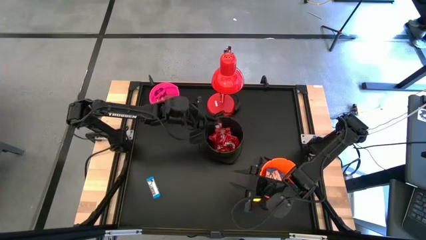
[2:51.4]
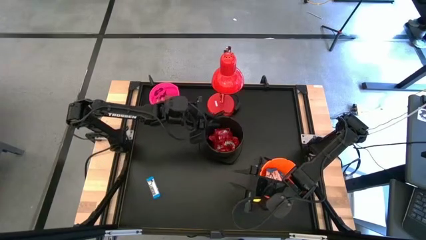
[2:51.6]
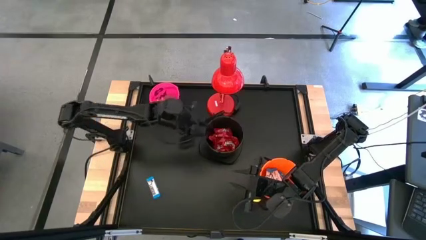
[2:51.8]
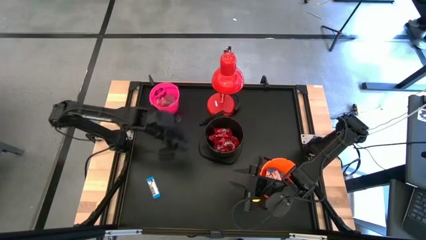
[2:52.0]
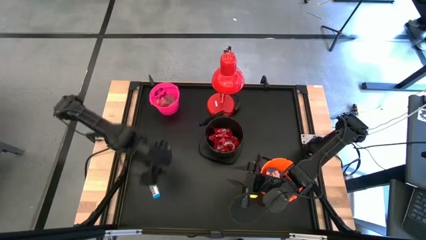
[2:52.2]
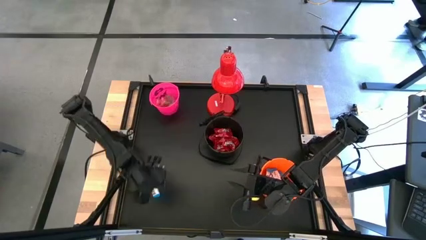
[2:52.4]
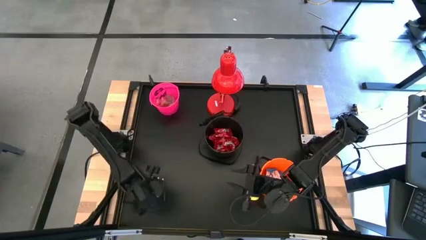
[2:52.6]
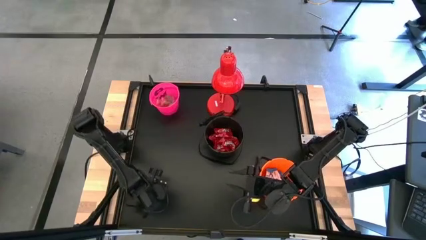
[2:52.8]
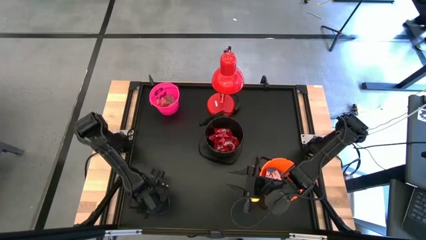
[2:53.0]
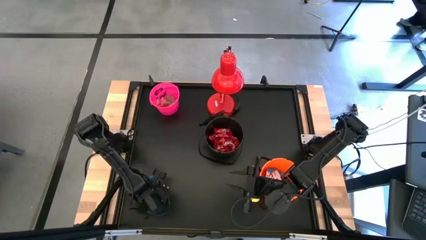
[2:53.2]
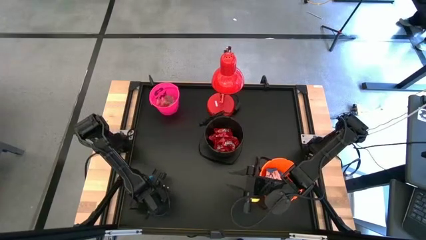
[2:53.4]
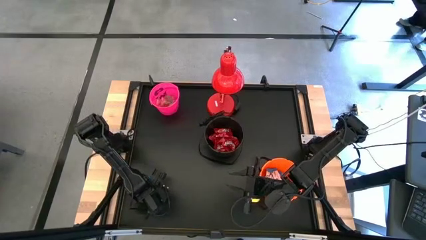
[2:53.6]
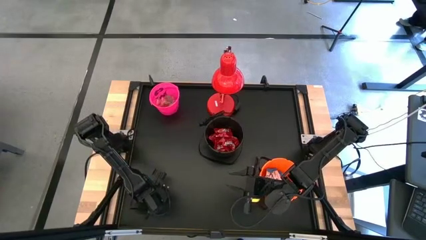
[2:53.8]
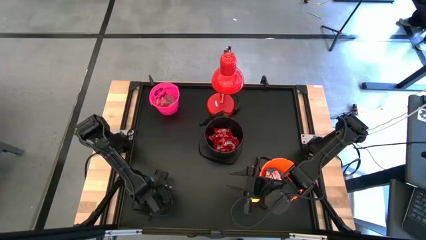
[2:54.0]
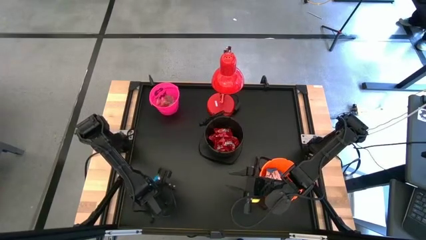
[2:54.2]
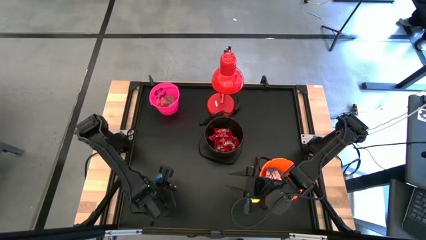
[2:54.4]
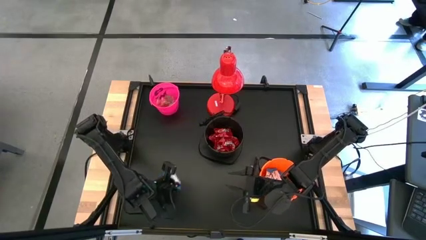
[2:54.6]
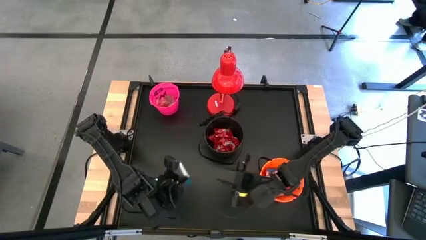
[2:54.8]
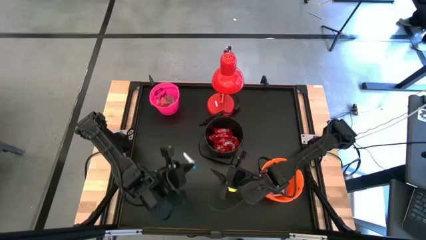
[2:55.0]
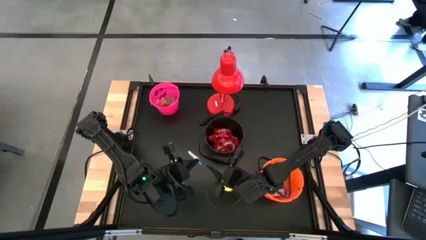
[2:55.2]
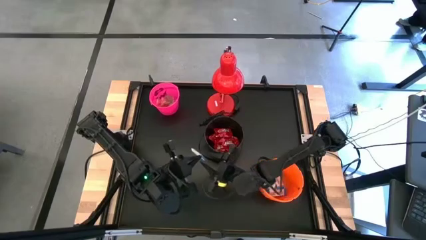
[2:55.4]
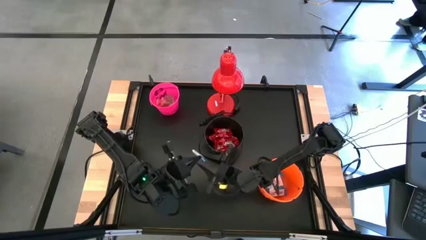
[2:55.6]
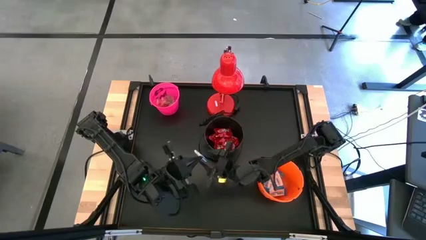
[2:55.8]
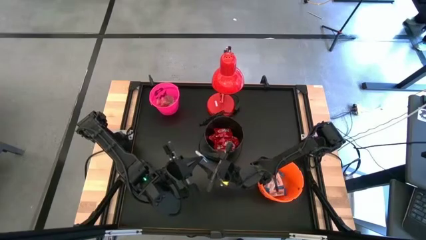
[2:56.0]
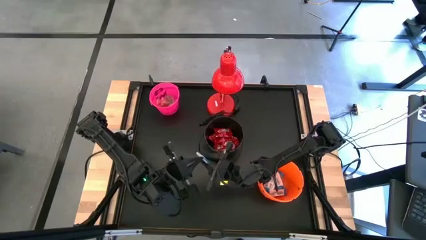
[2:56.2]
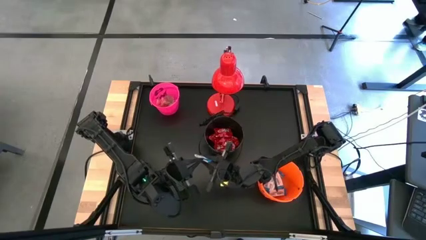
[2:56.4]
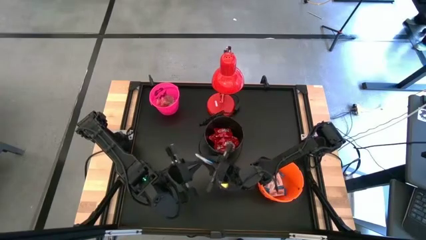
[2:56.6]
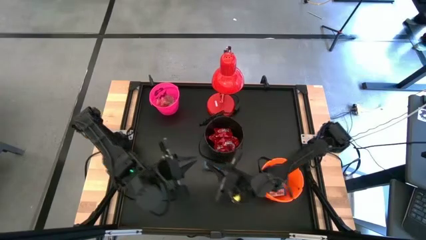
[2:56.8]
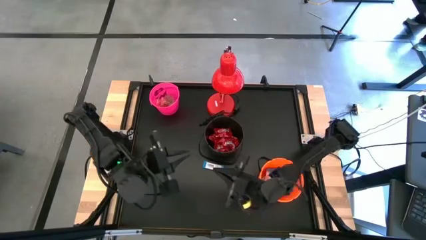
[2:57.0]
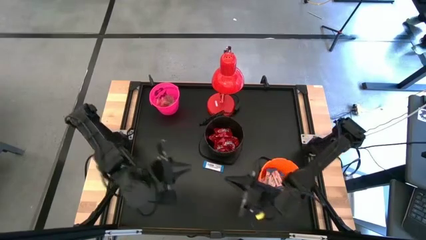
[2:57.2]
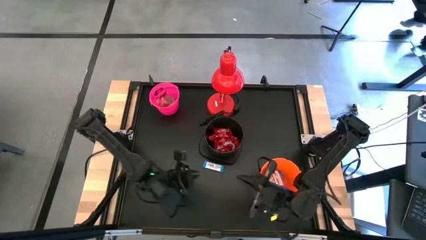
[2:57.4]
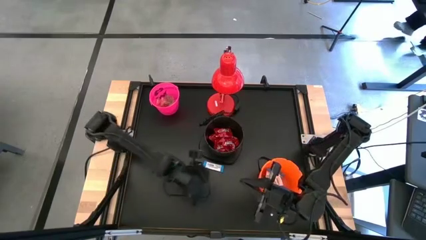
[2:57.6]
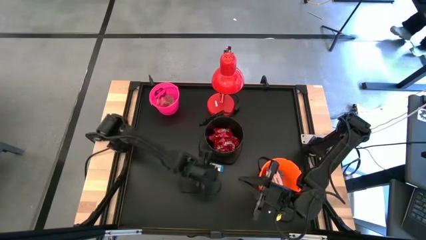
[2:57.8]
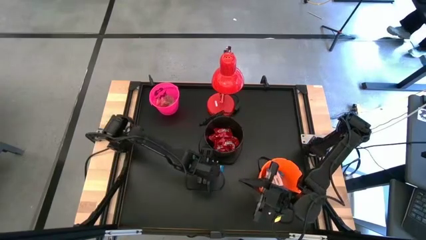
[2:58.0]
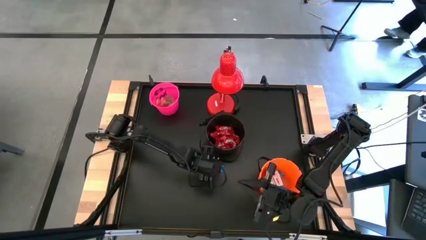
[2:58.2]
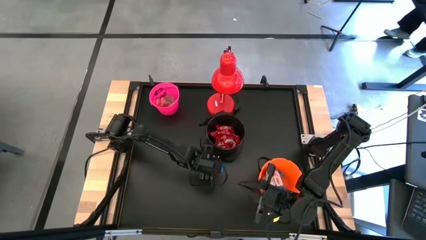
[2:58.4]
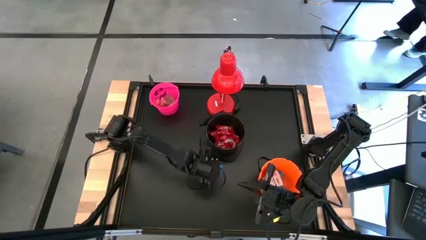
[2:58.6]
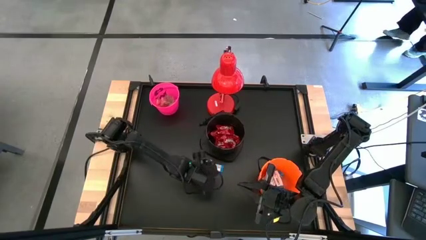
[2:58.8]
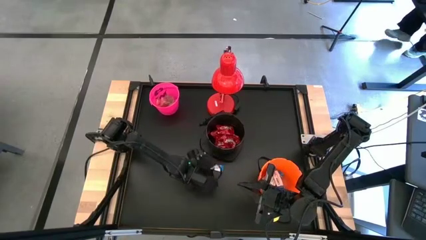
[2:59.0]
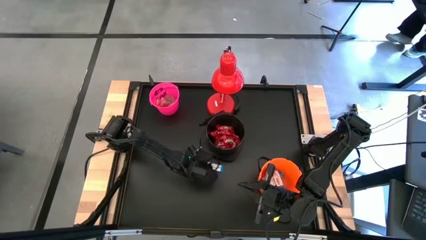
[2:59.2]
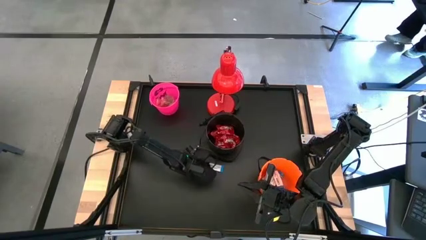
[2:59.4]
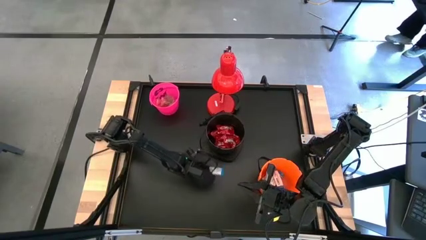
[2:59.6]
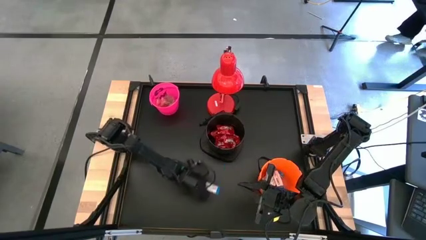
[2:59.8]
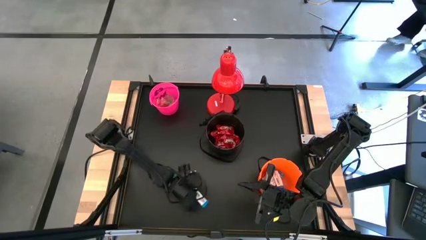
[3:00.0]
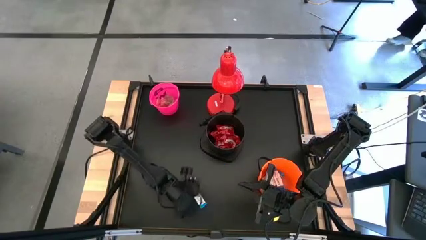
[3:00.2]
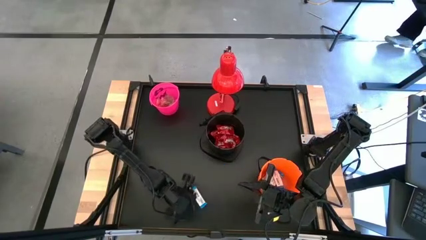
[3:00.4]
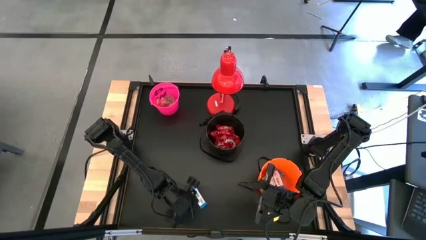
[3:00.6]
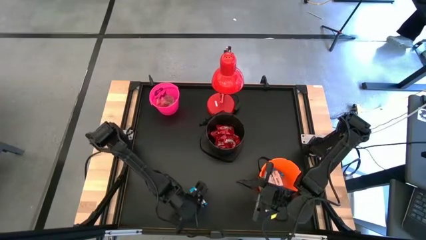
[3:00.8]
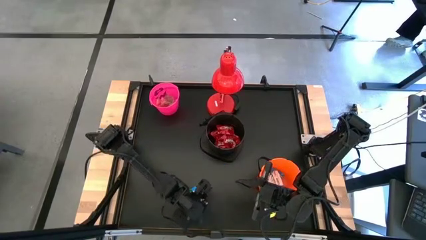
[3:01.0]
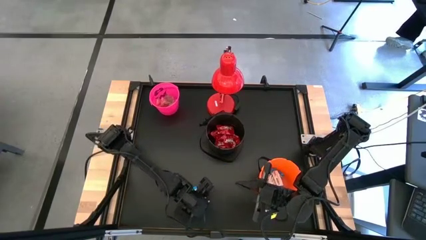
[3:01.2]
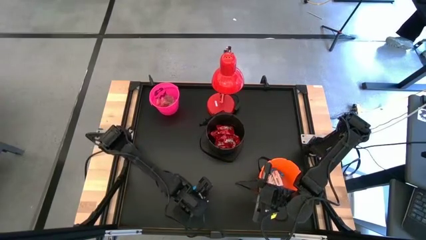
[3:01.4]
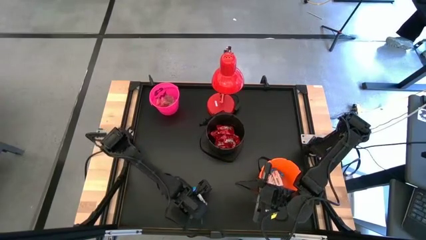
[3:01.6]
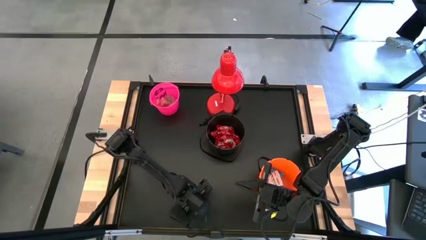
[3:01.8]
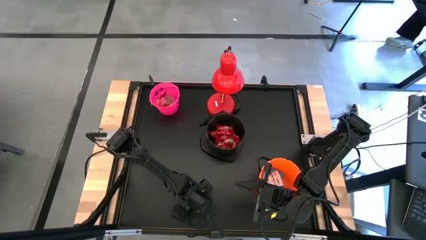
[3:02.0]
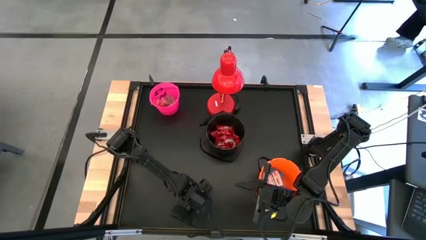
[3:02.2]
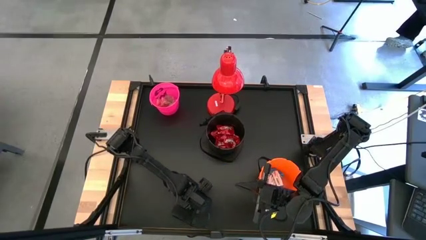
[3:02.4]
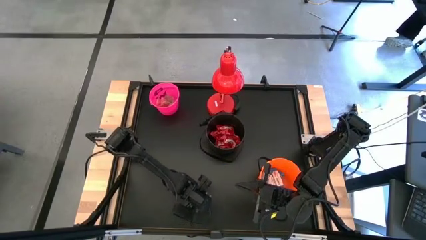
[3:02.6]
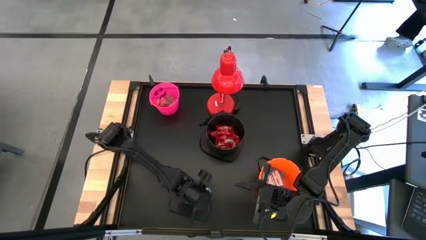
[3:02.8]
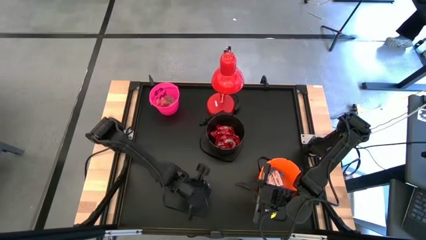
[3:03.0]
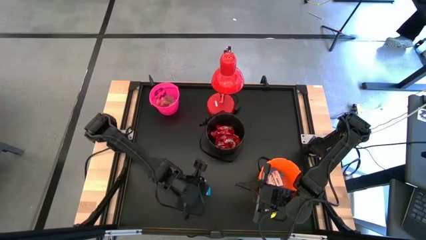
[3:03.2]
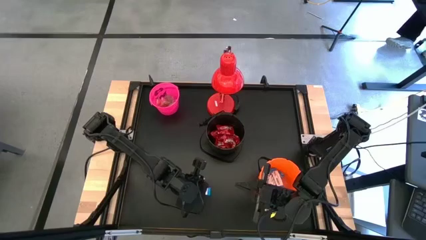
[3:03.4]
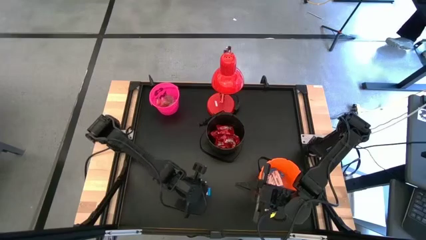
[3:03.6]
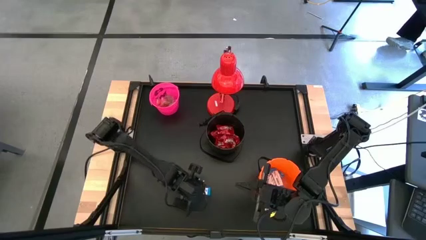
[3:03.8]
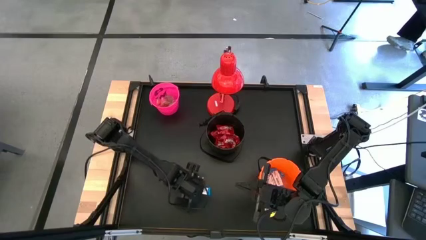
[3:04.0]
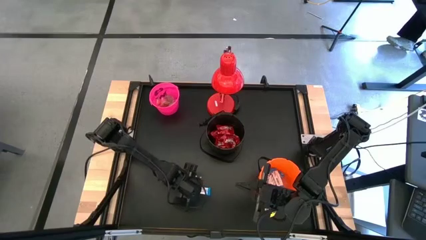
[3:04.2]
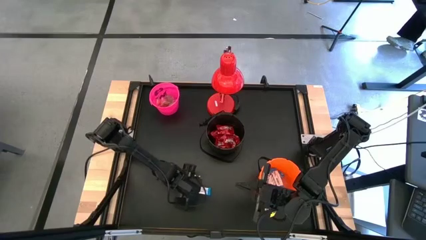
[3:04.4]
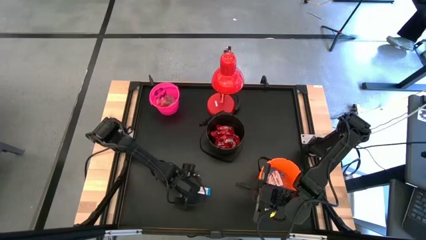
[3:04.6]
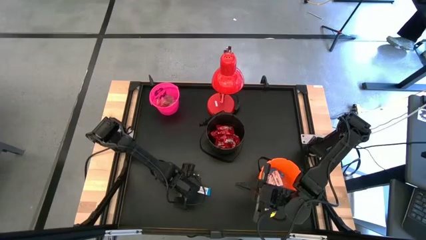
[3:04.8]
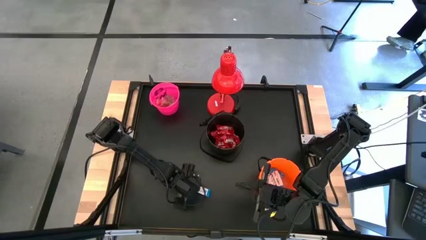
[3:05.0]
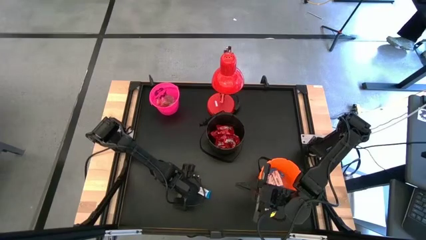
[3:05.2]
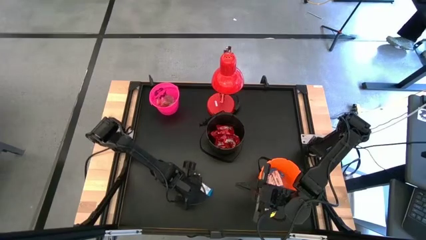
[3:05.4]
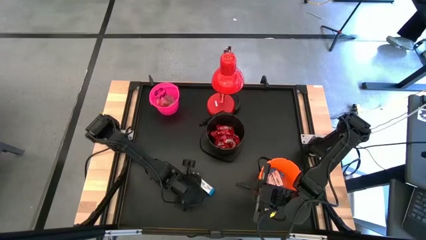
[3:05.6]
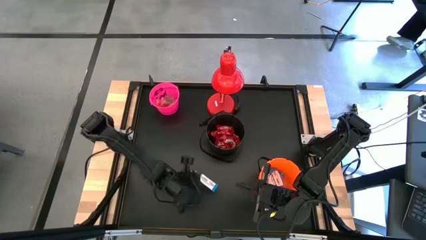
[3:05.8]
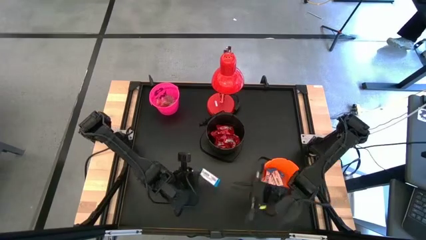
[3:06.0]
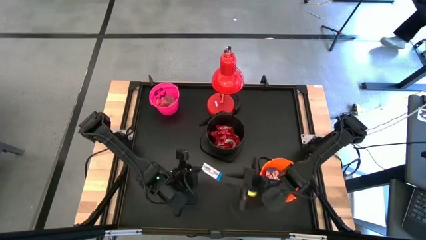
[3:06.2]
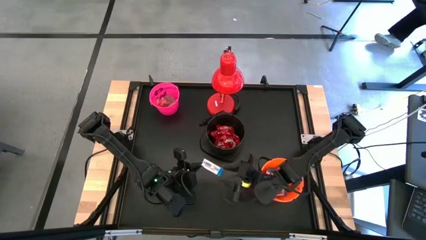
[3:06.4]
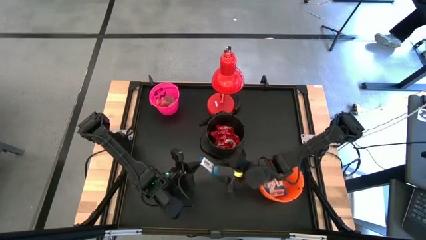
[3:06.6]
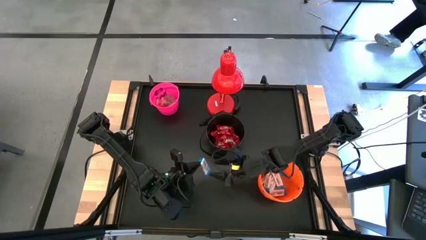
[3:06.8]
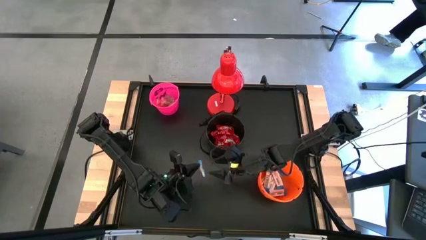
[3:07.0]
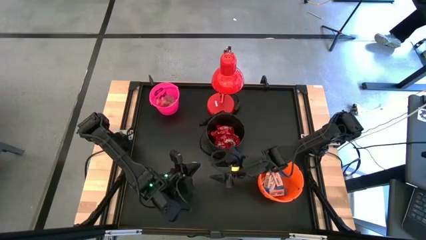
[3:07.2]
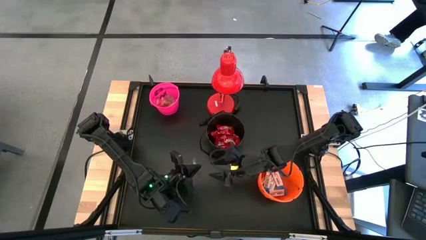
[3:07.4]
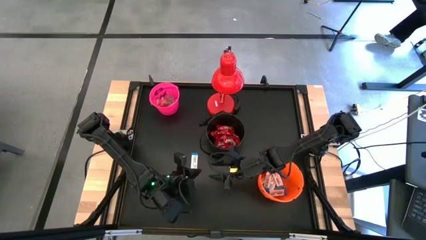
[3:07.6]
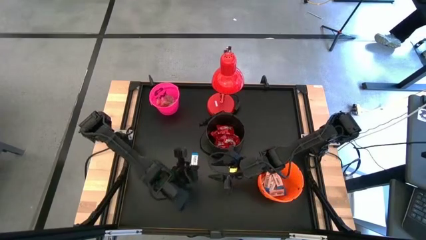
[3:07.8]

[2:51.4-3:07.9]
Task: Organize candy in baskets
Put the white chocolate into the orange bucket
